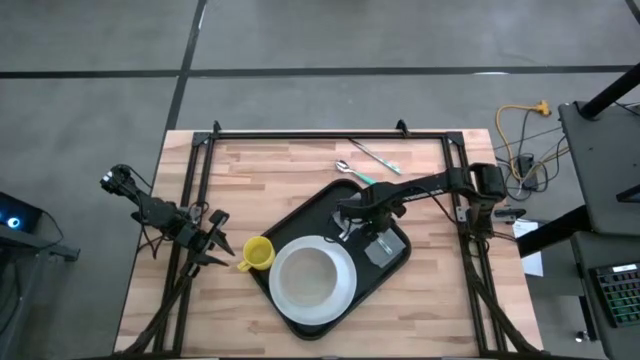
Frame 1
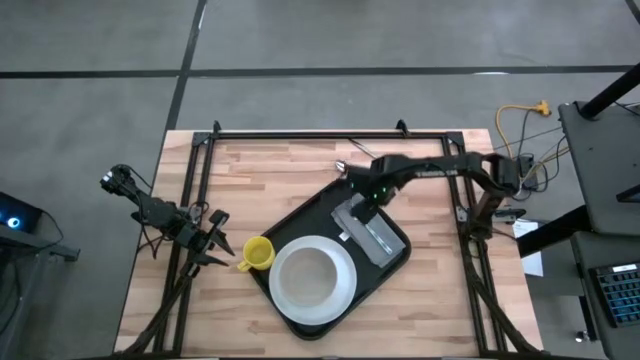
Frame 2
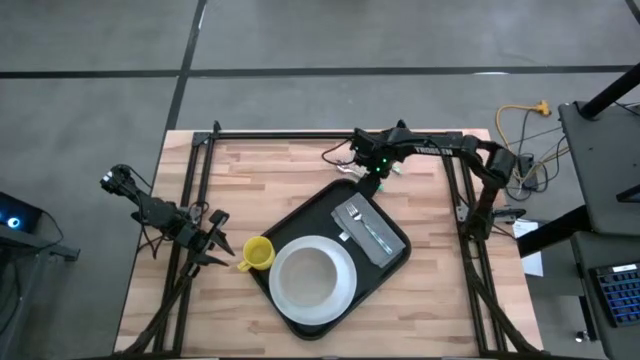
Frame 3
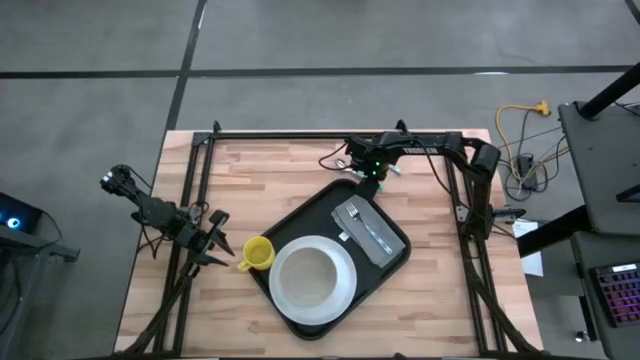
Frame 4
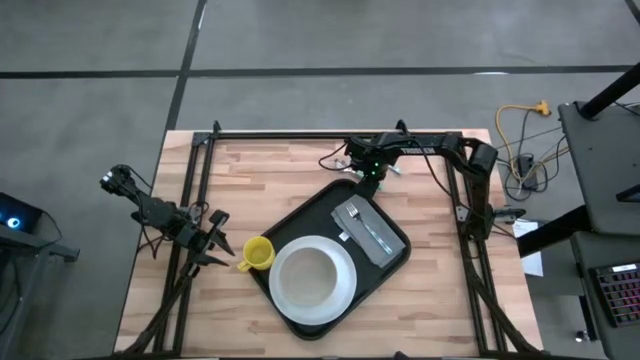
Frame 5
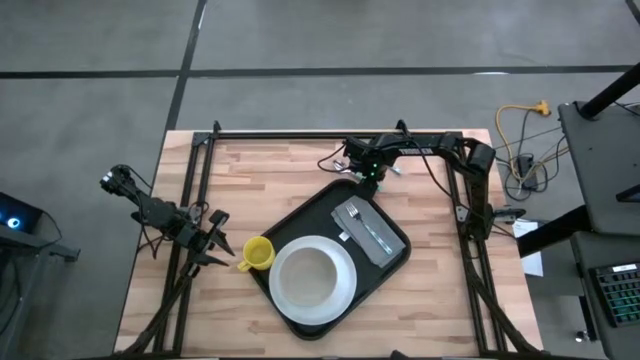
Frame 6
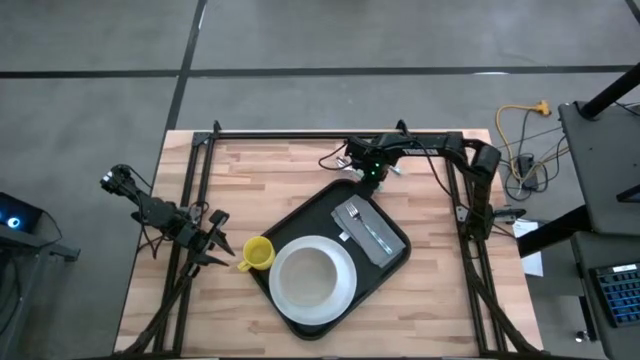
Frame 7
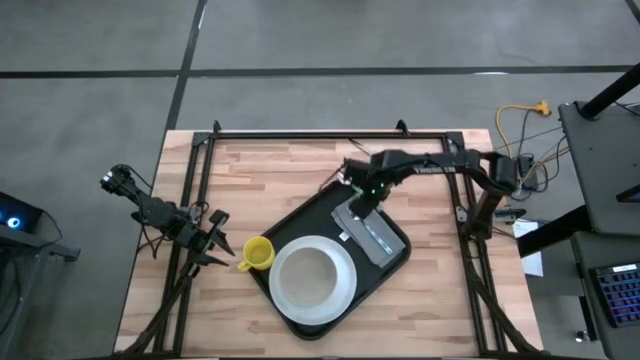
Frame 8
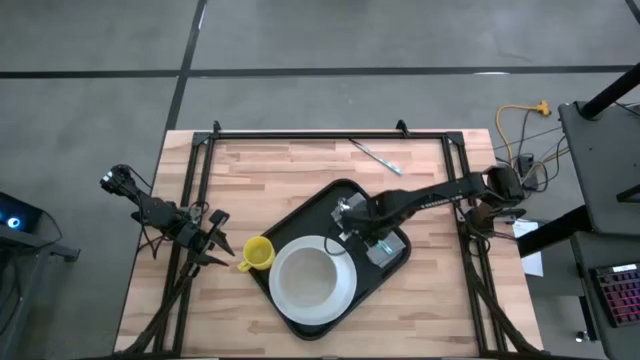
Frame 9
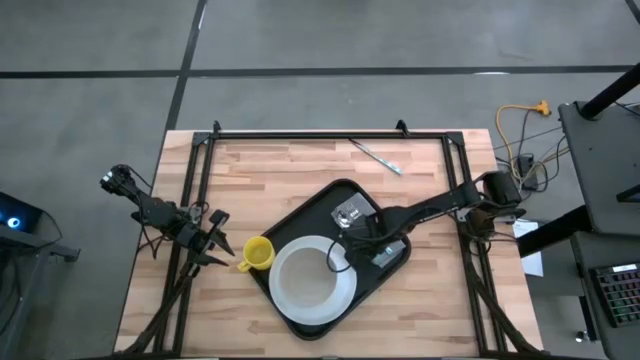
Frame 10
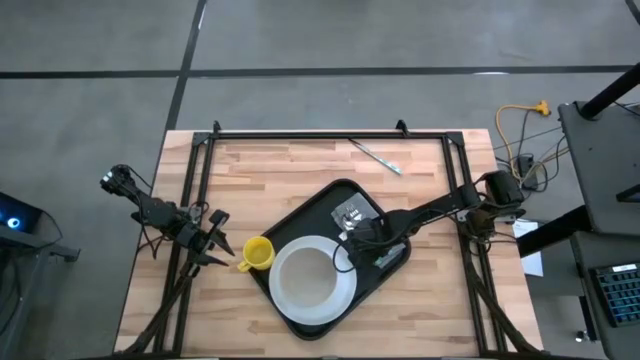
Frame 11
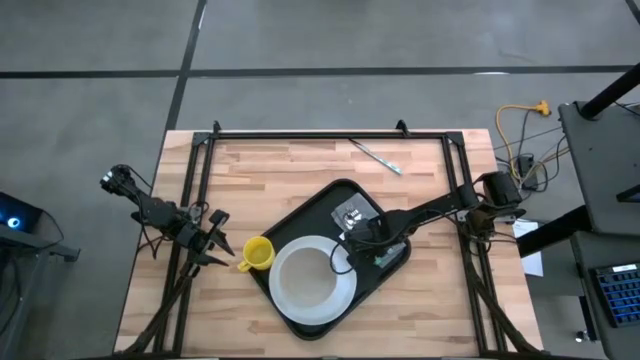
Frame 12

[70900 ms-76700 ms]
Task: Set up tray
Put the green spoon to the left of the blue fork on the gray napkin on the black tray

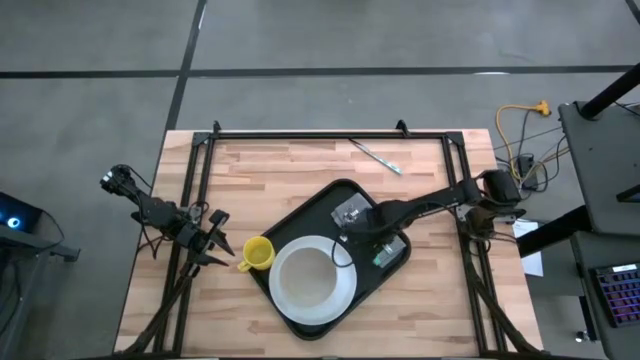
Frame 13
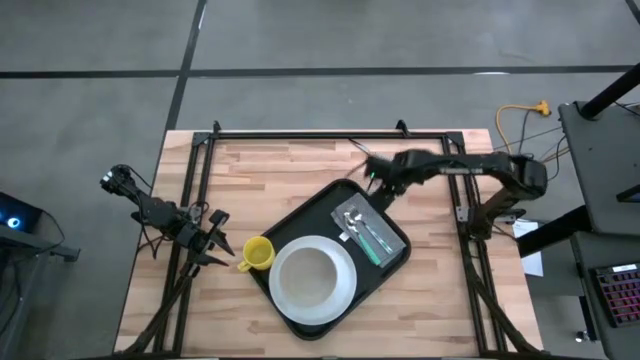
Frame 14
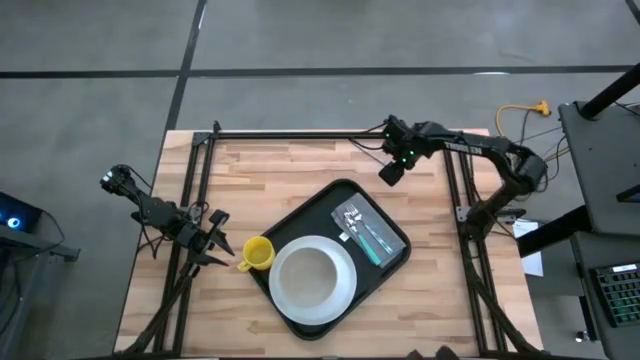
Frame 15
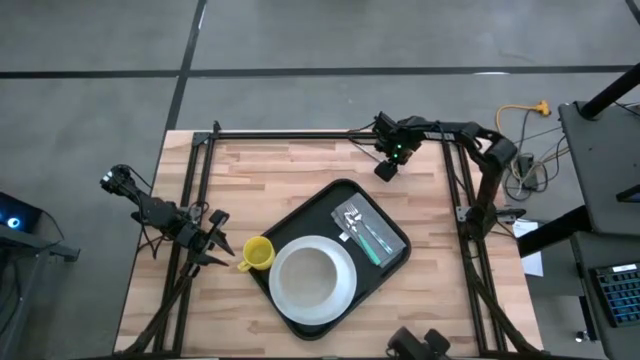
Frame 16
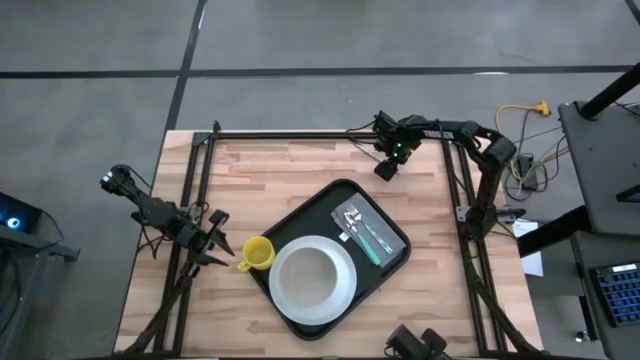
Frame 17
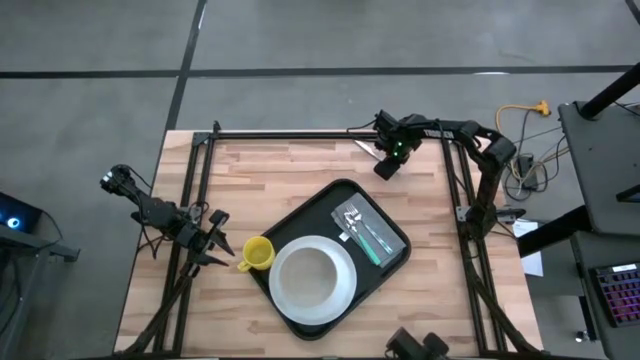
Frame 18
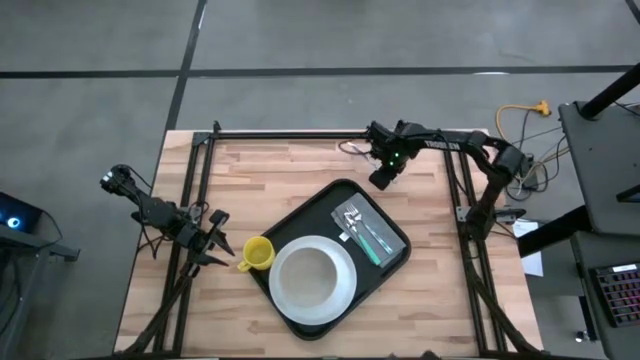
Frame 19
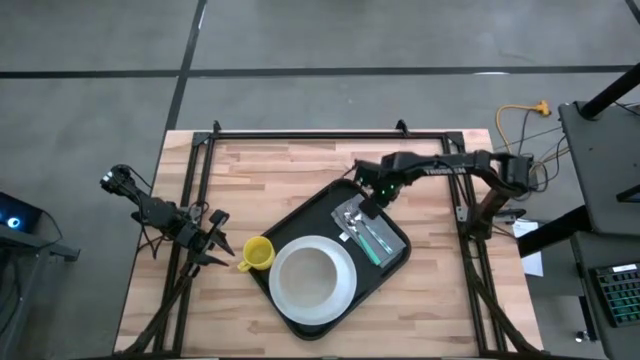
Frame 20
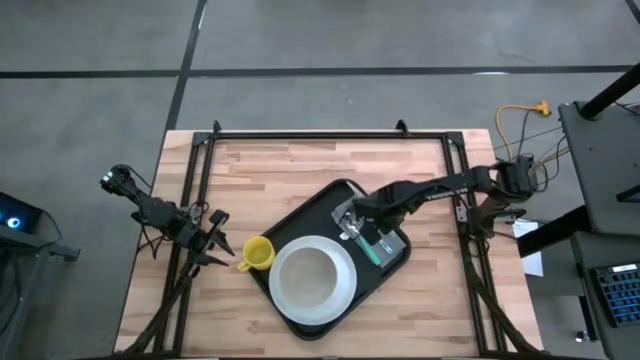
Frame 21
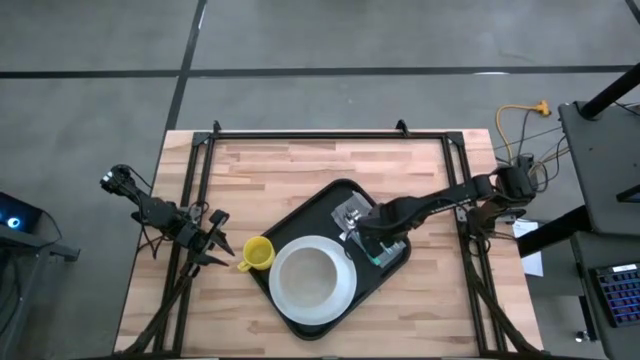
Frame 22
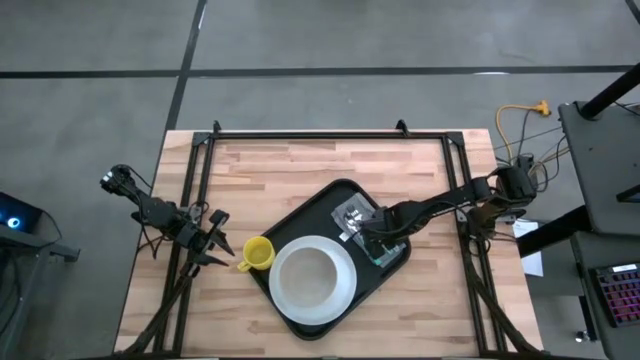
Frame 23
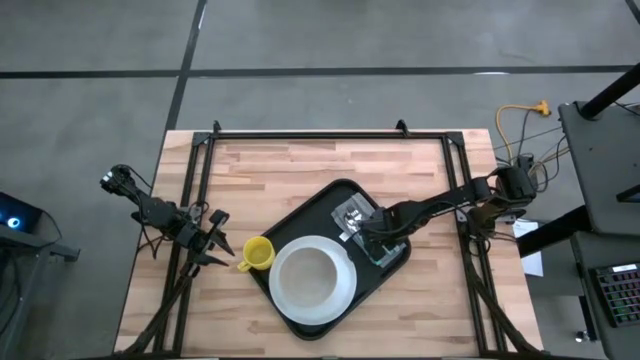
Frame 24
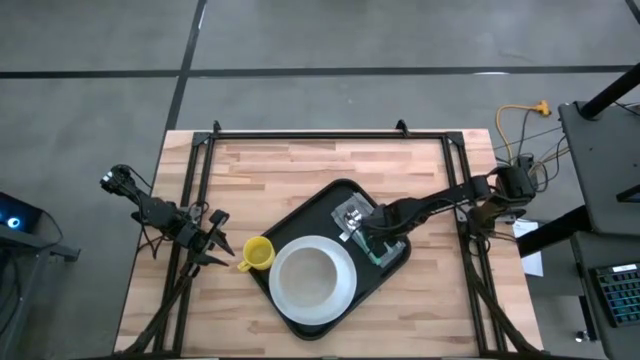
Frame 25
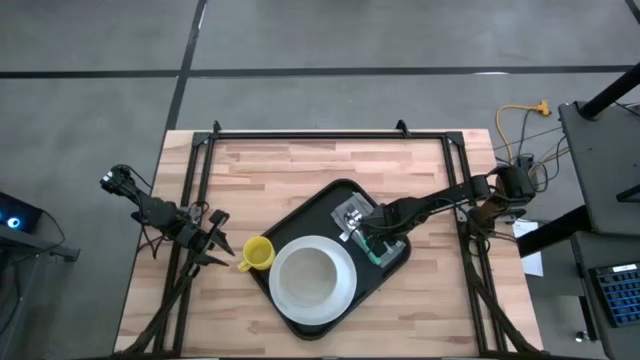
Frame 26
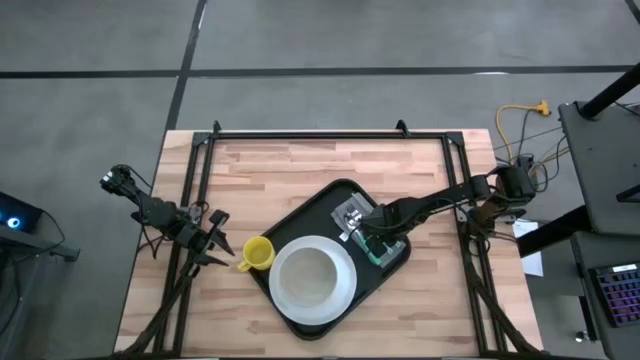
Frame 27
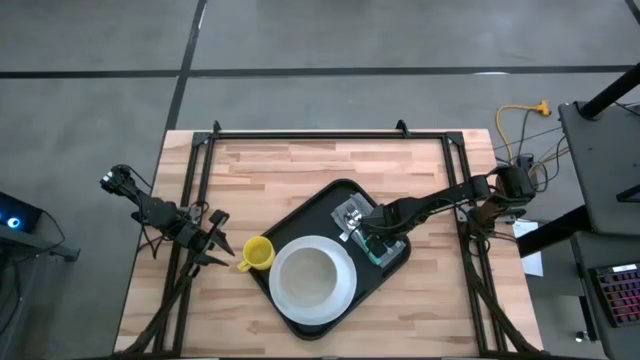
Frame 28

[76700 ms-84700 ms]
Put the blue knife to the right of the blue fork on the gray napkin on the black tray

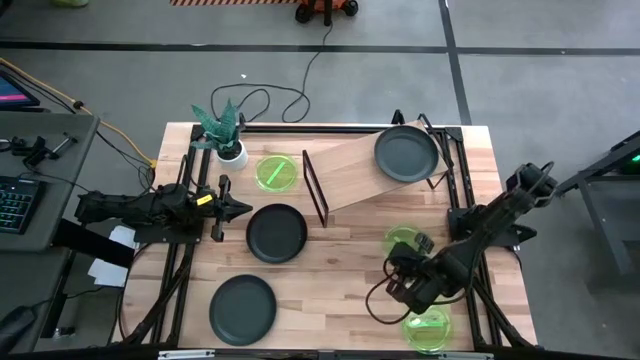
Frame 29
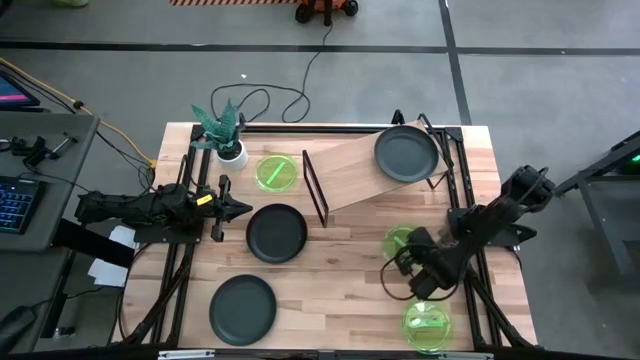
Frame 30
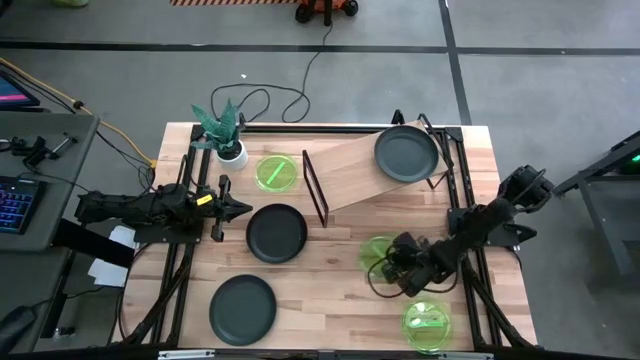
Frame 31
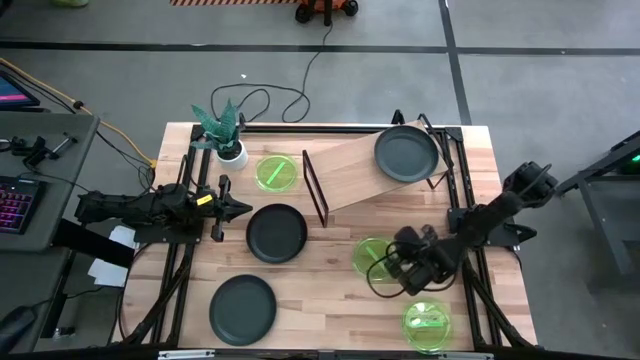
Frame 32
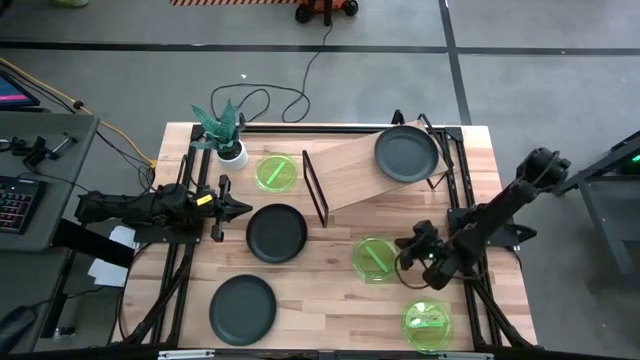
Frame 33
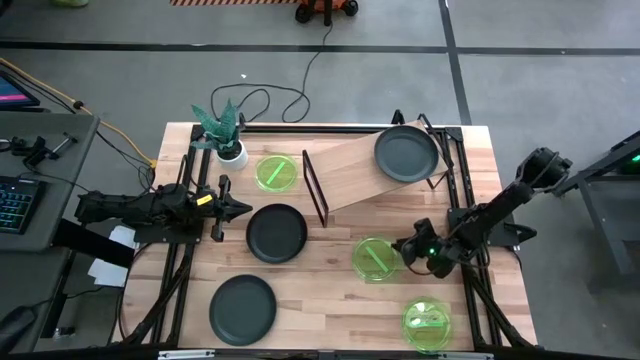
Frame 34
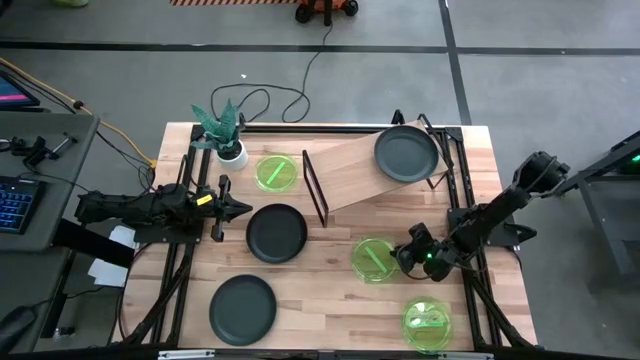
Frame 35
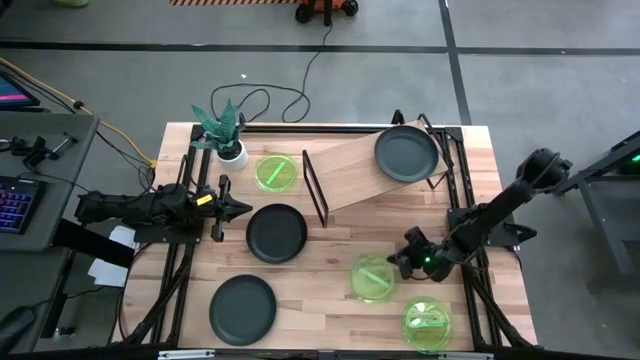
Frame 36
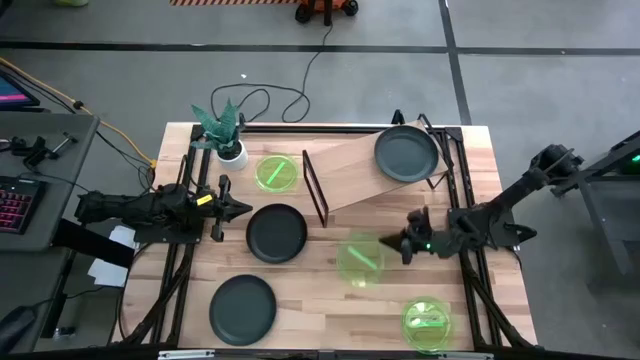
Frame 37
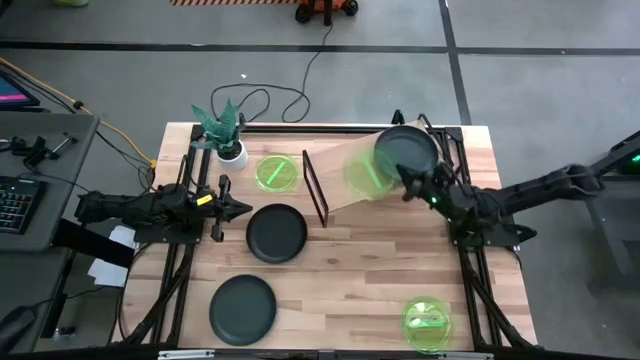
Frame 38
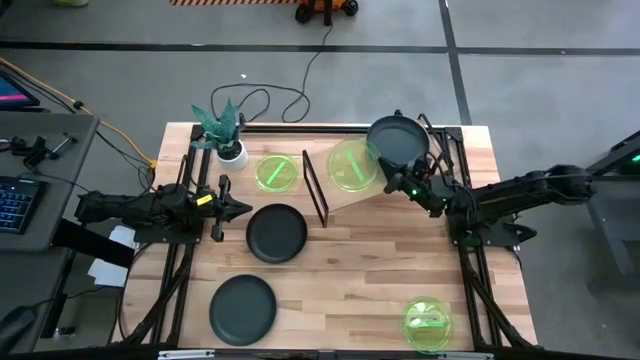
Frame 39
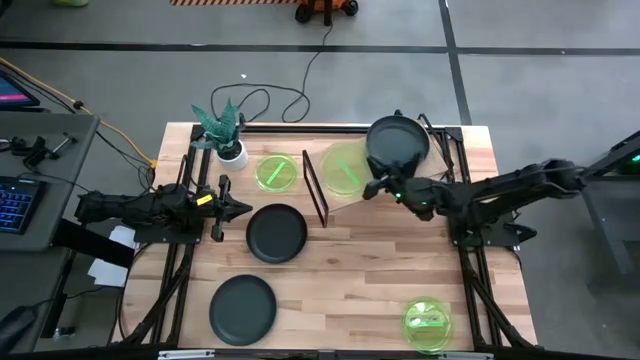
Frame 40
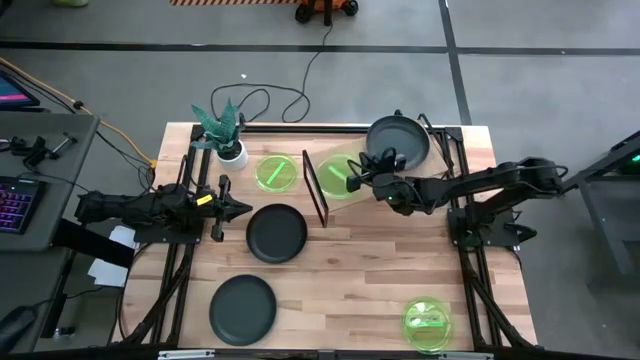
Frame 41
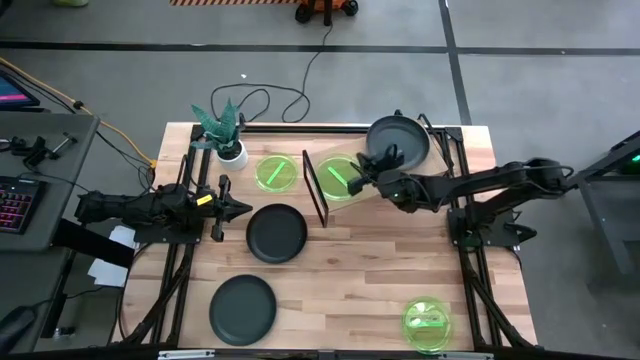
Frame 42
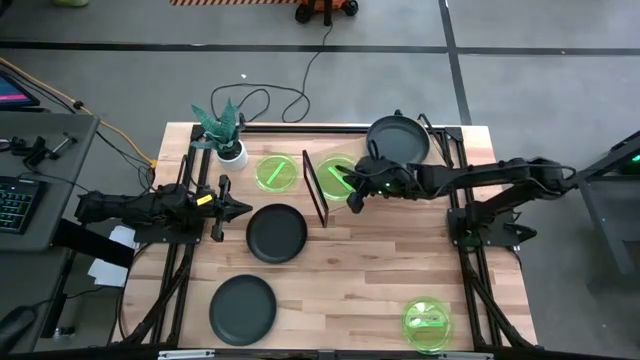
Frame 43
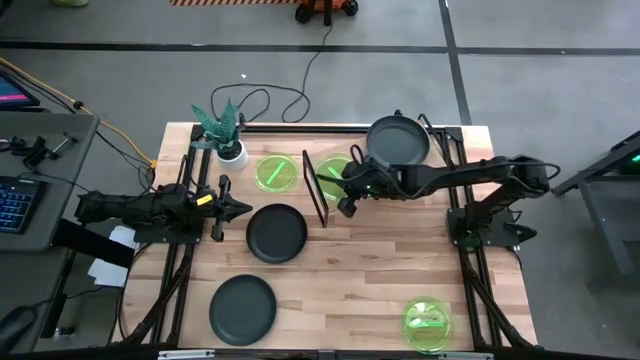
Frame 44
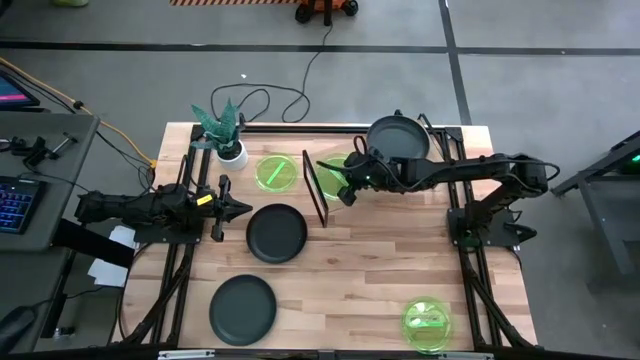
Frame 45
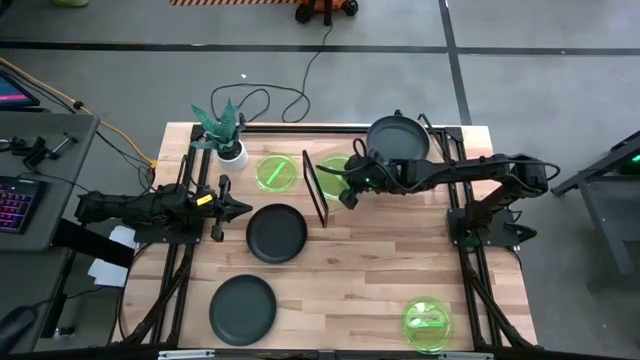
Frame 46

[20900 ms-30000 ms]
Task: Place and stack plates onto a shelf
Put the middle right green plate on the shelf
